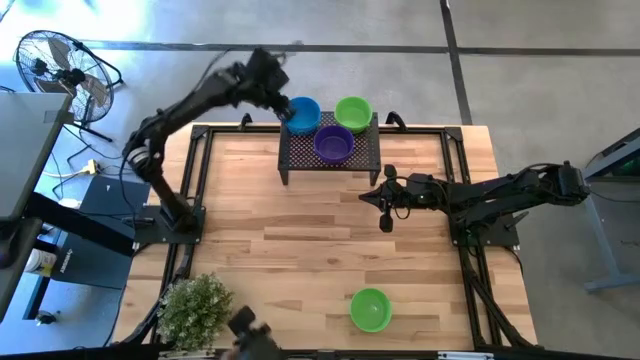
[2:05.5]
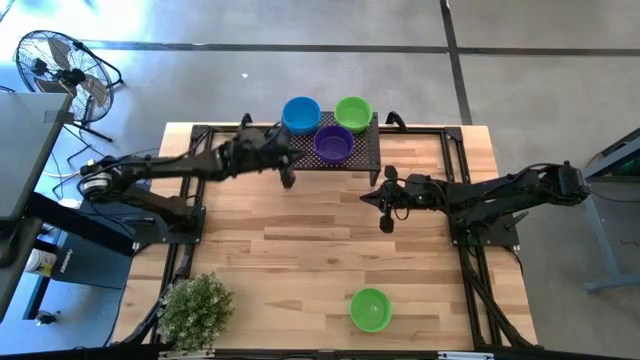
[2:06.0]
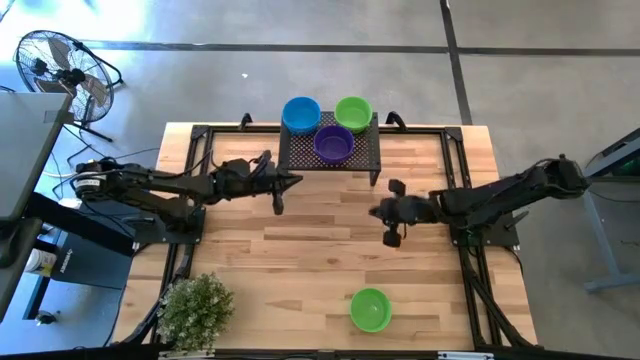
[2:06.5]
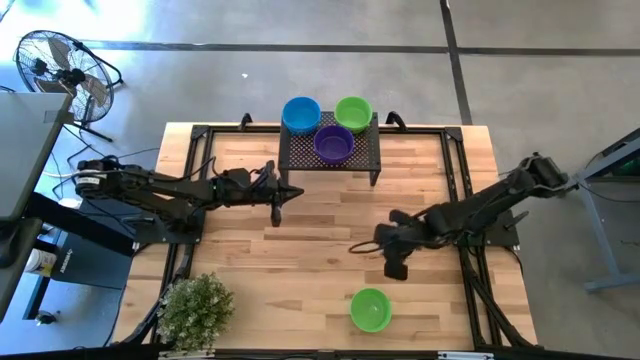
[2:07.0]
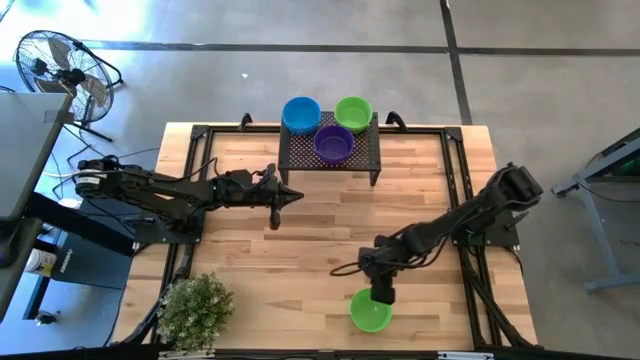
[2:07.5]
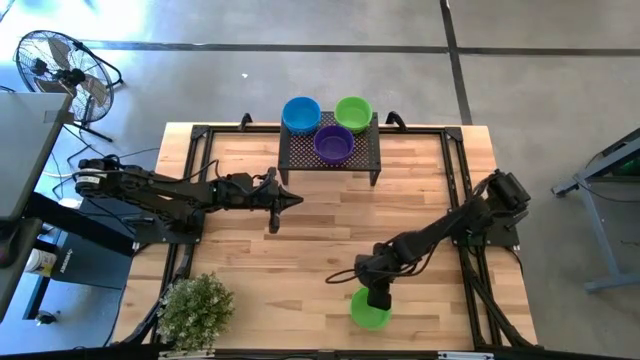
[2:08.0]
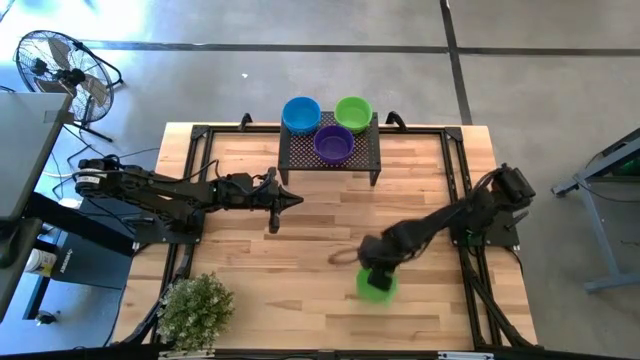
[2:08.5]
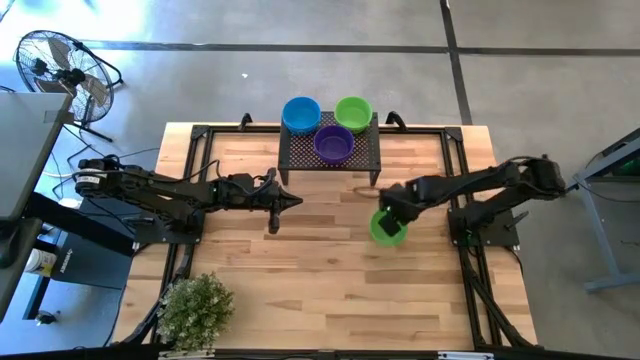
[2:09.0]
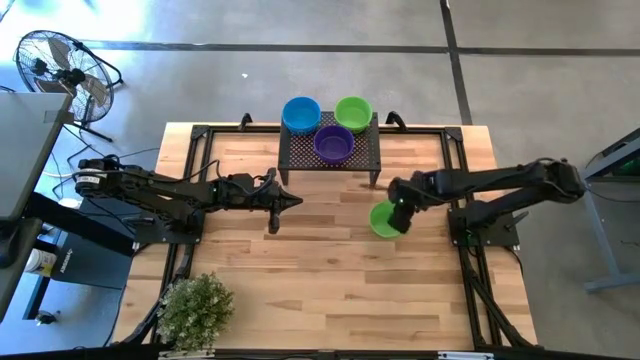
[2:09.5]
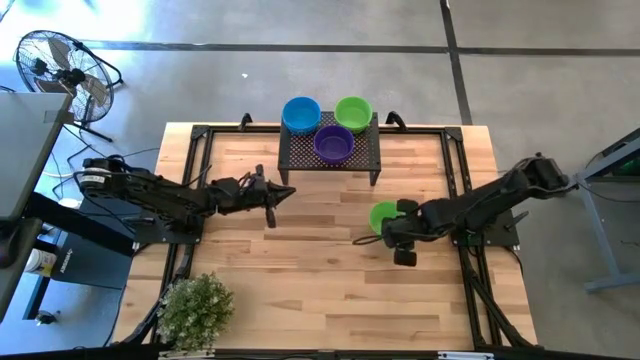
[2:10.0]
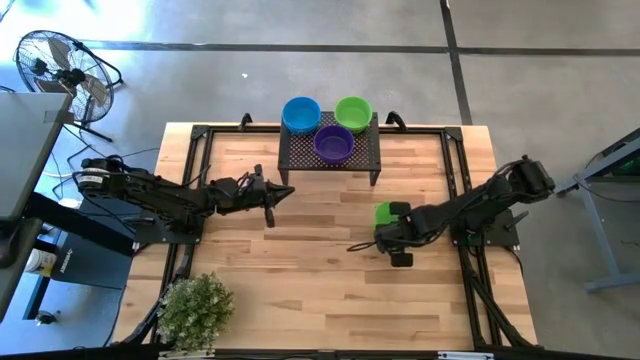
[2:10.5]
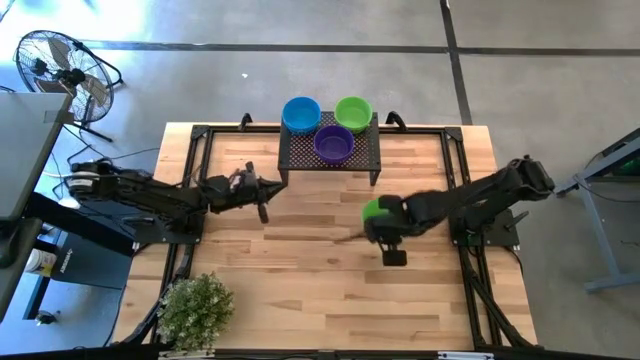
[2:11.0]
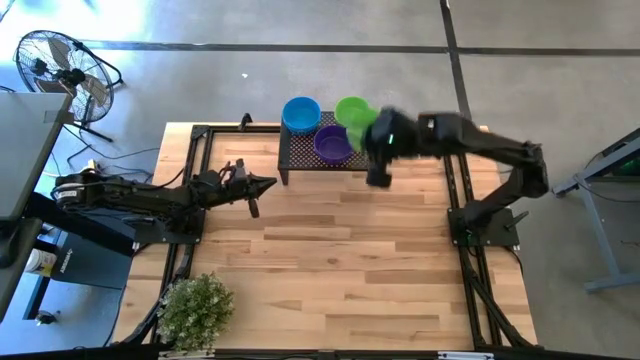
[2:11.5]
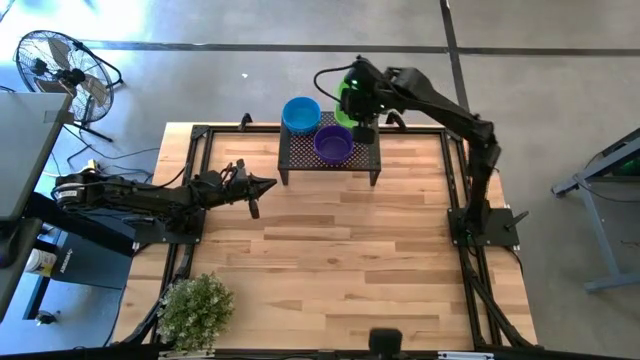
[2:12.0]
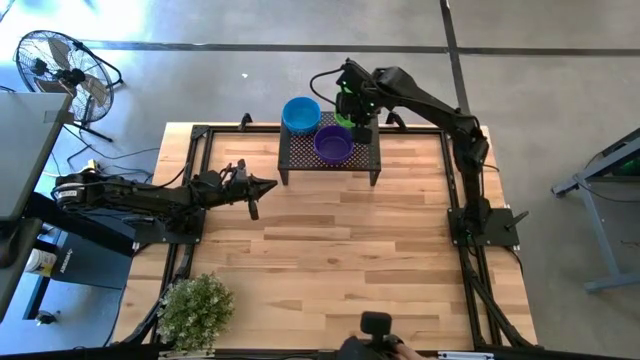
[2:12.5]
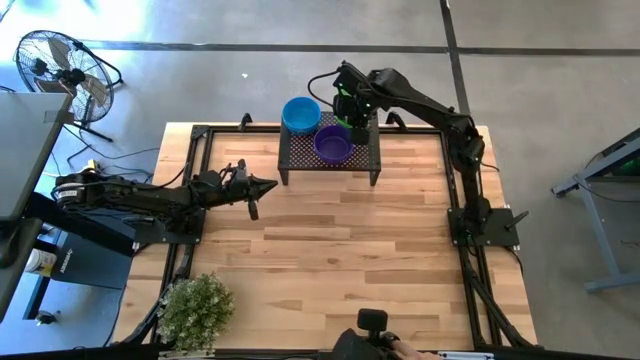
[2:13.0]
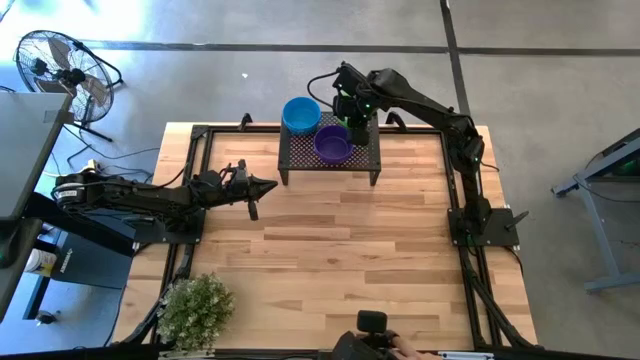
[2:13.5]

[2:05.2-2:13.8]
Task: Pick & Place Mini bowls
Stack the green bowl on the green bowl on the shelf

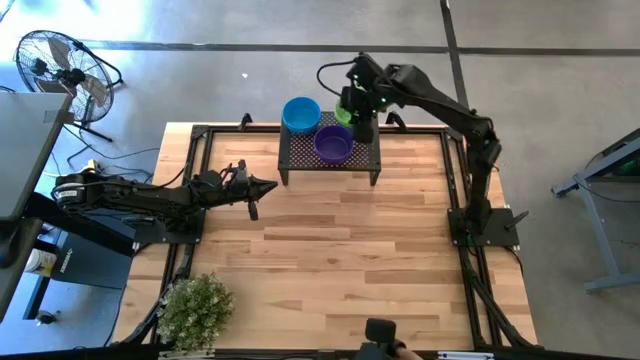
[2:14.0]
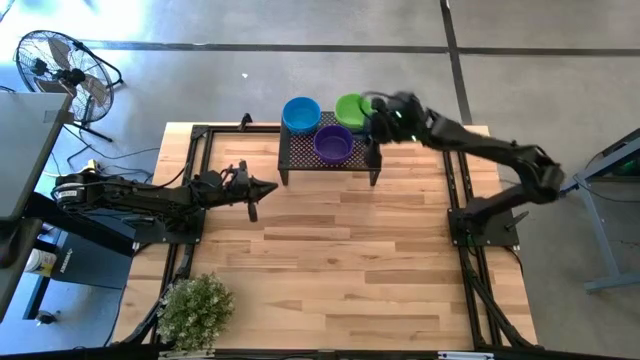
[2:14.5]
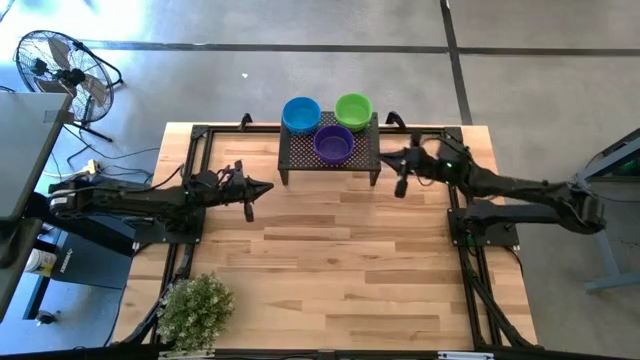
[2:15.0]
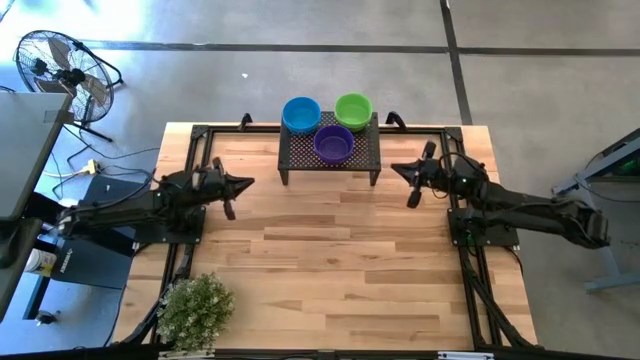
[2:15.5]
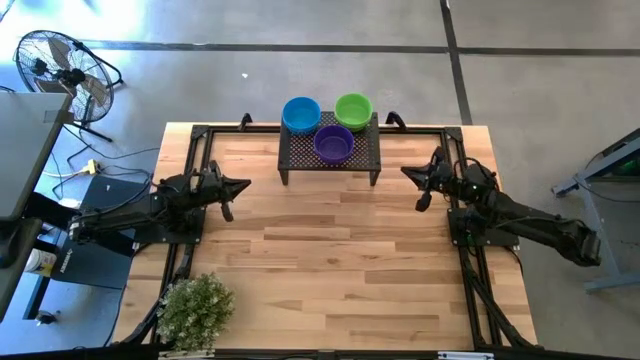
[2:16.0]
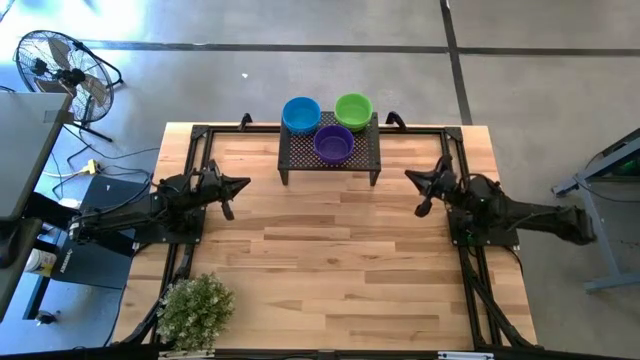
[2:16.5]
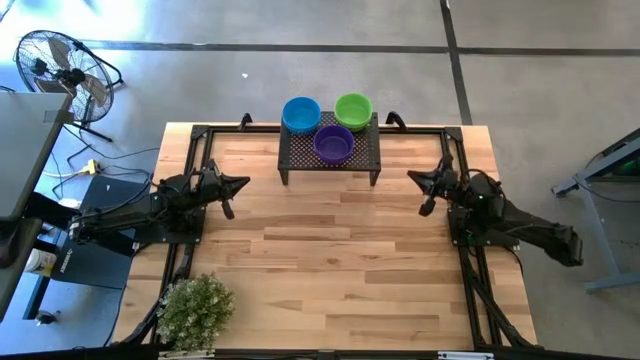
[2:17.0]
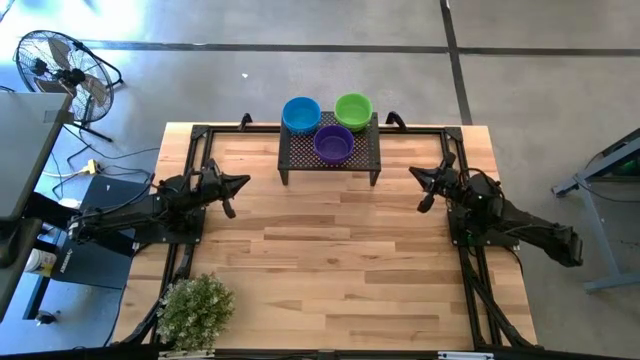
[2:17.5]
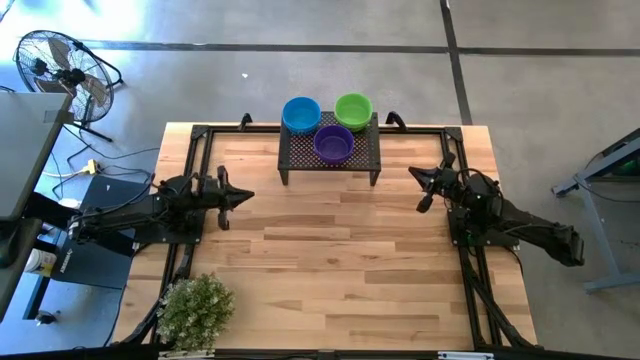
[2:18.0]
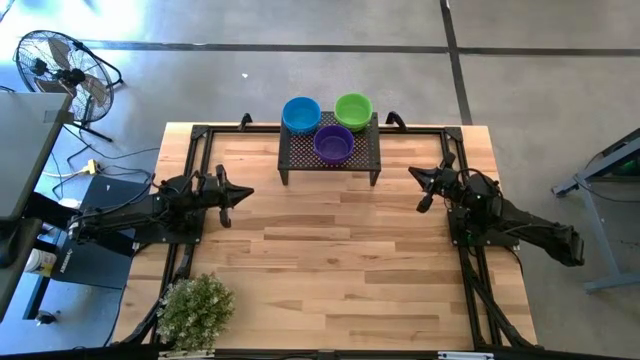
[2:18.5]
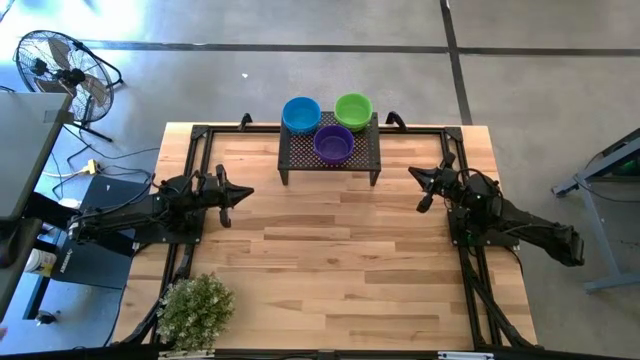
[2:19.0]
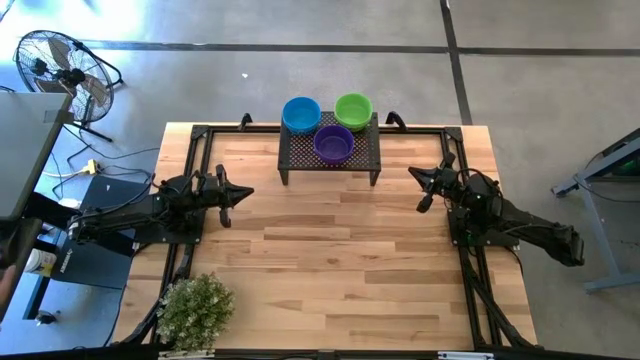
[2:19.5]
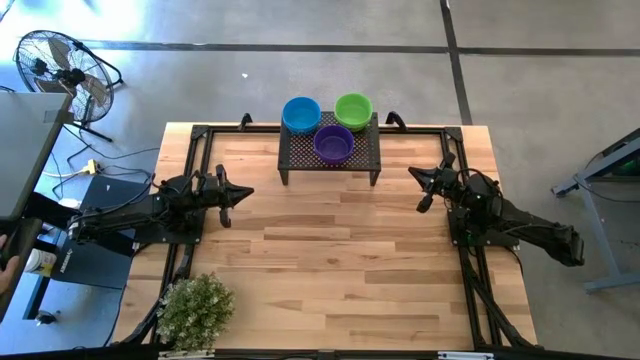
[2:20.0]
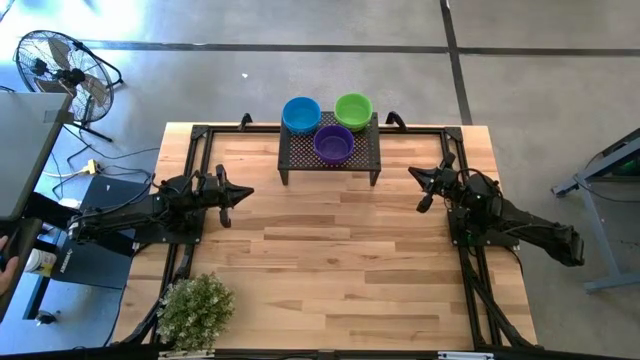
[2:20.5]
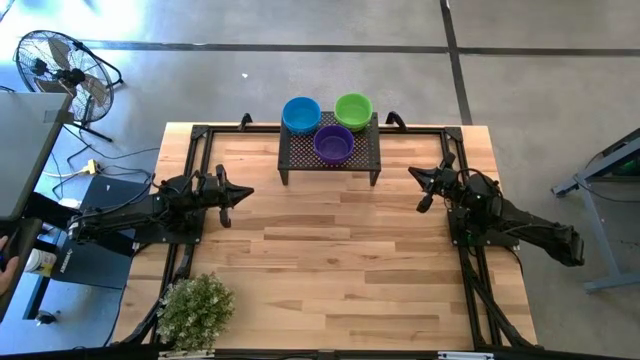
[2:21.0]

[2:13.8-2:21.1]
Return to Home Position

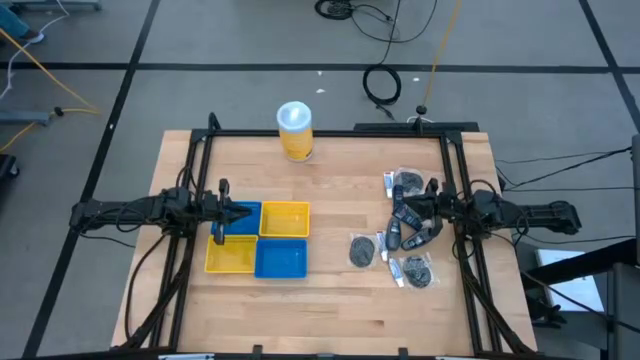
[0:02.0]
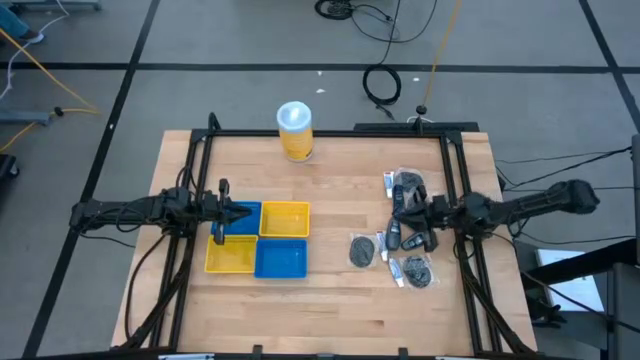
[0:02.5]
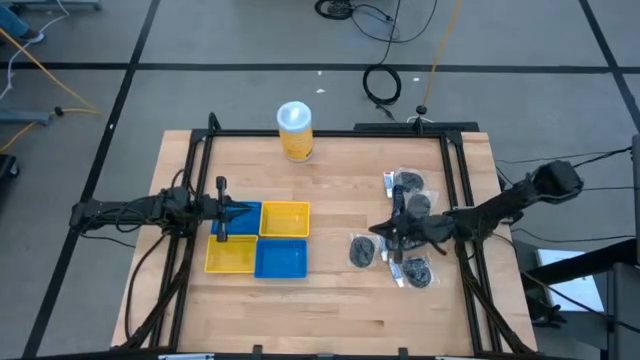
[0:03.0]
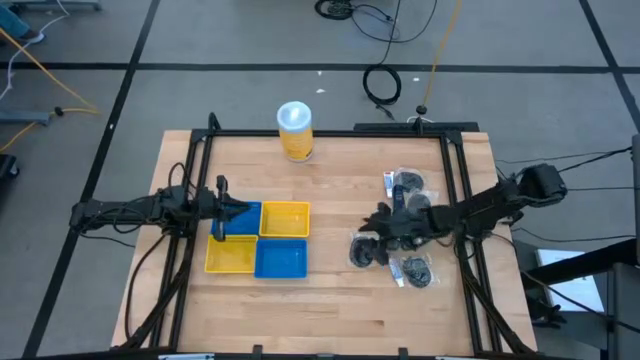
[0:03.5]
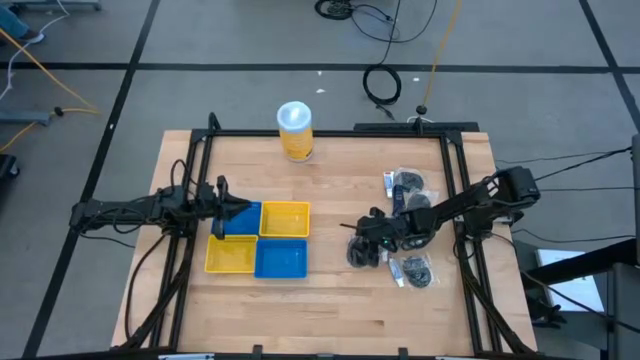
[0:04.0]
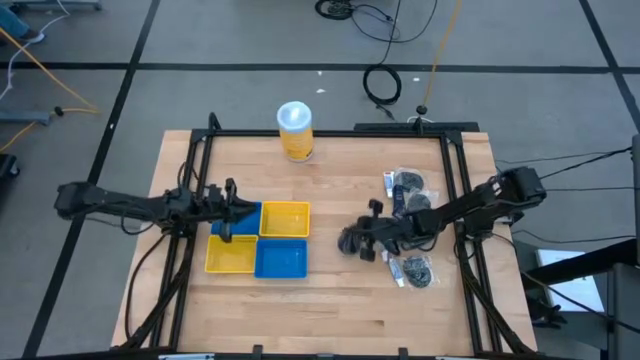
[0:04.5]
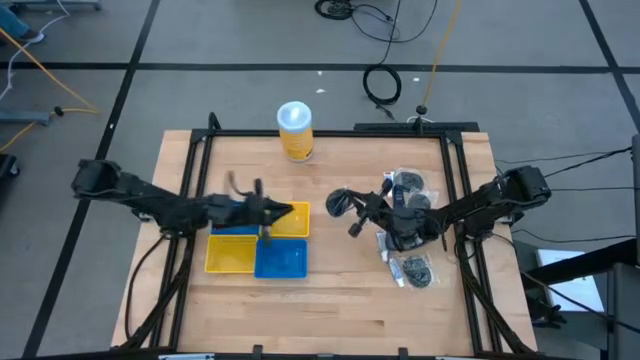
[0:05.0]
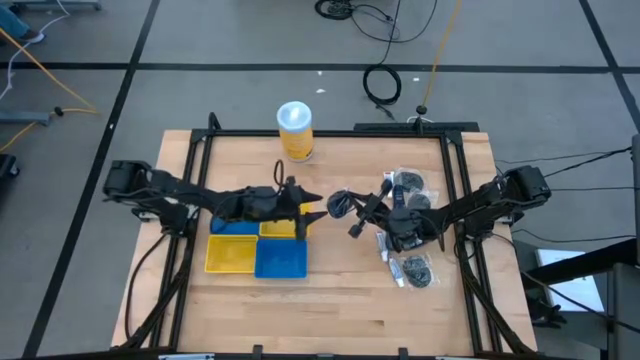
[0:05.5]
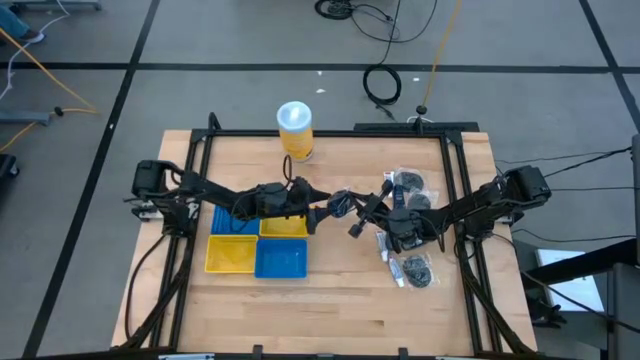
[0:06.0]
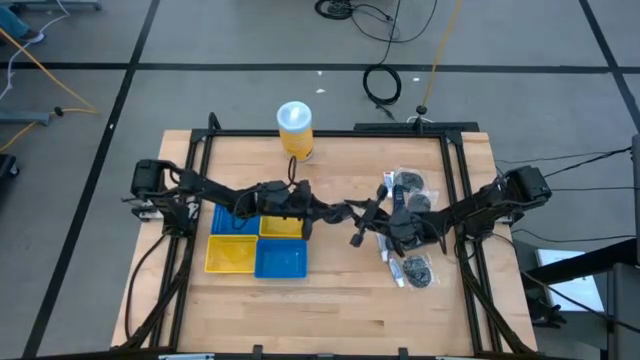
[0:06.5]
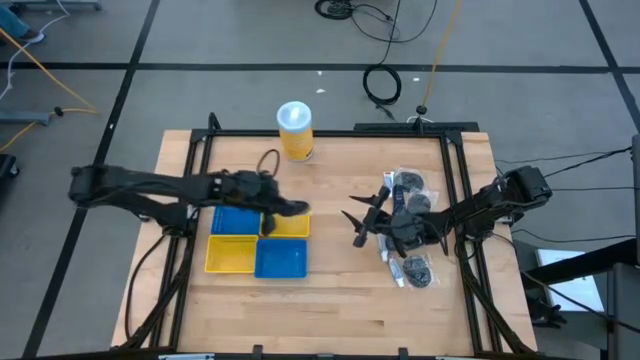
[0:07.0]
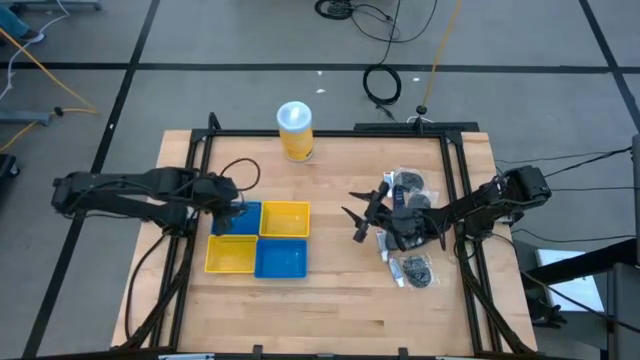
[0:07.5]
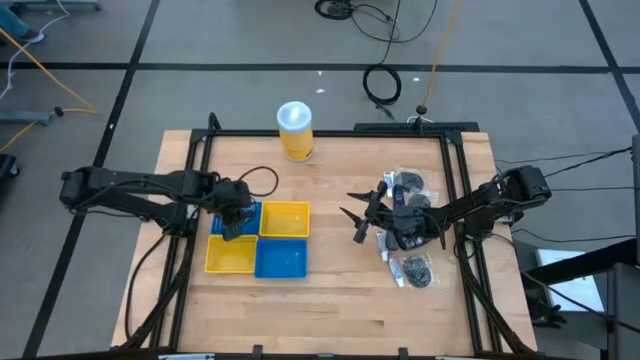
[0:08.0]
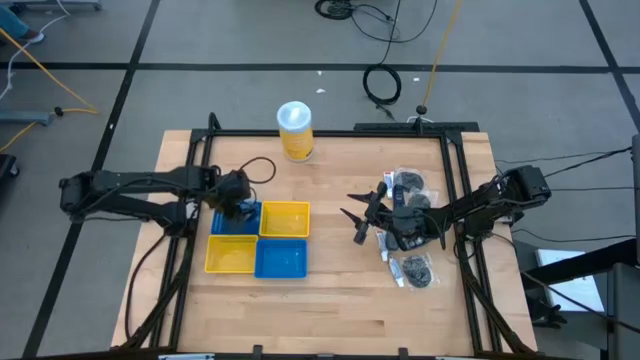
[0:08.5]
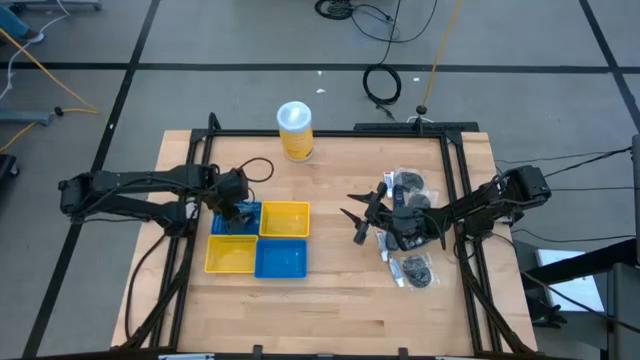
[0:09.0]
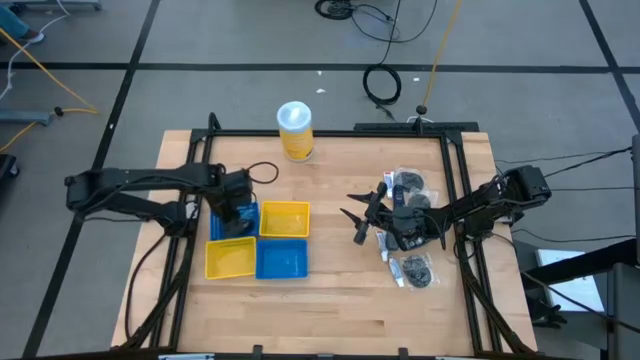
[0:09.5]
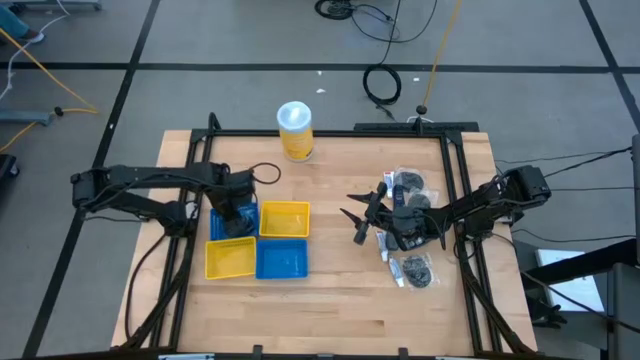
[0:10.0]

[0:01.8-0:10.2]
Task: Pick & Place Travel size toiletries
Put the black hairbrush into the top blue bin
